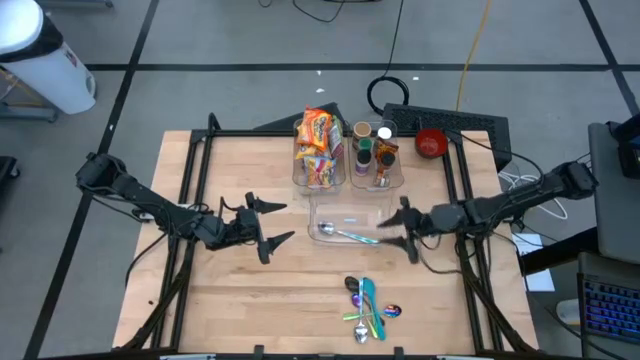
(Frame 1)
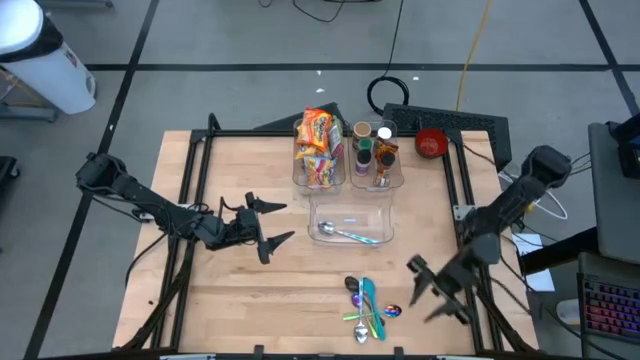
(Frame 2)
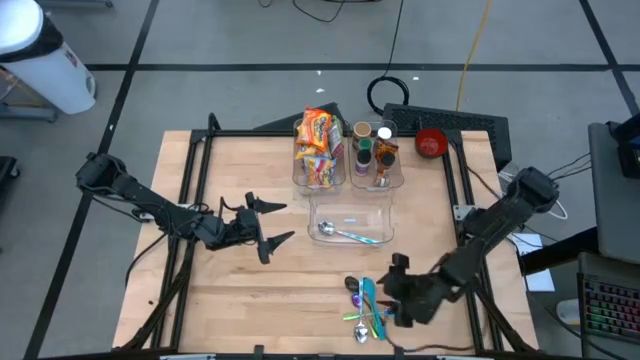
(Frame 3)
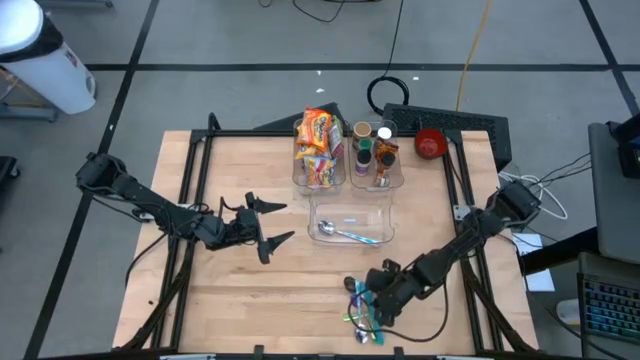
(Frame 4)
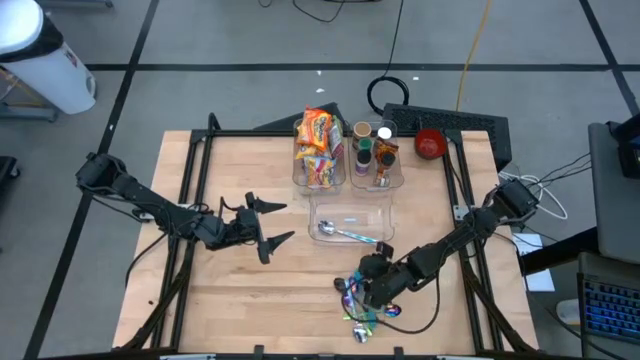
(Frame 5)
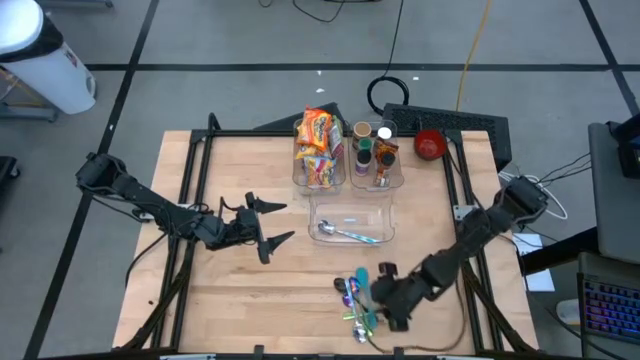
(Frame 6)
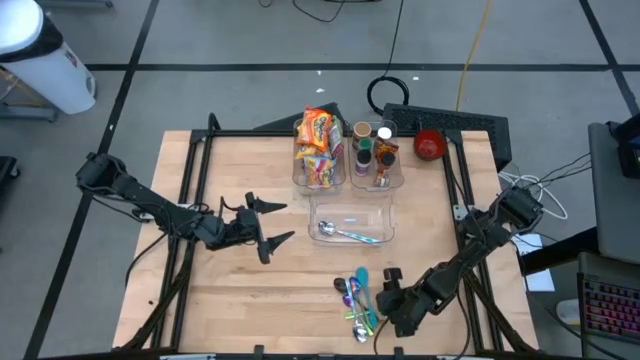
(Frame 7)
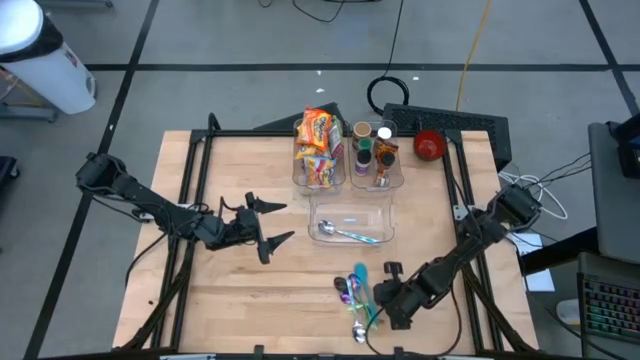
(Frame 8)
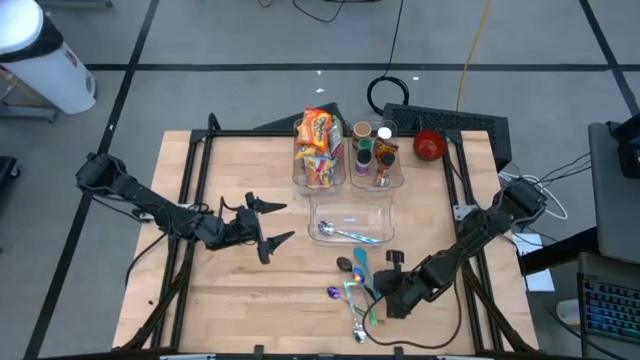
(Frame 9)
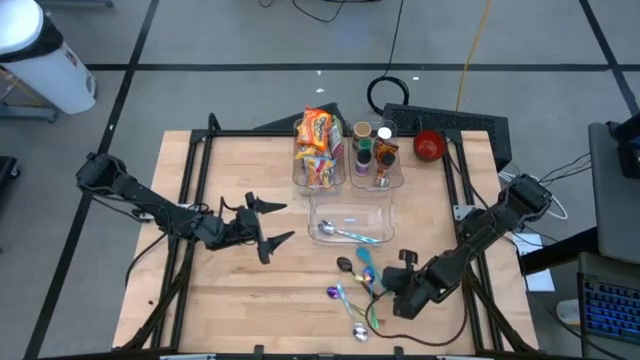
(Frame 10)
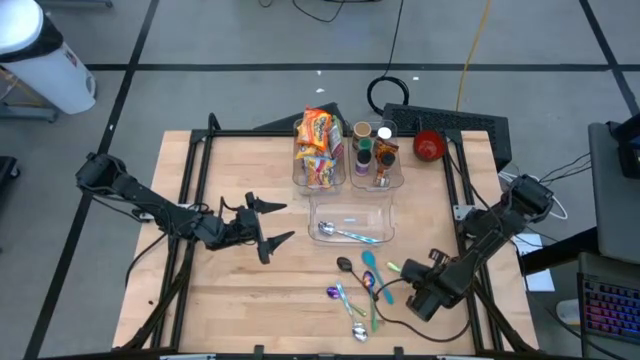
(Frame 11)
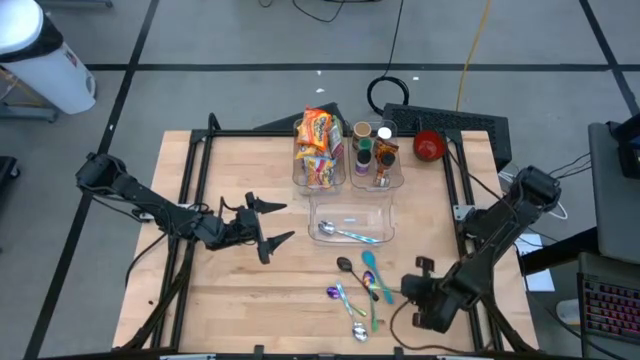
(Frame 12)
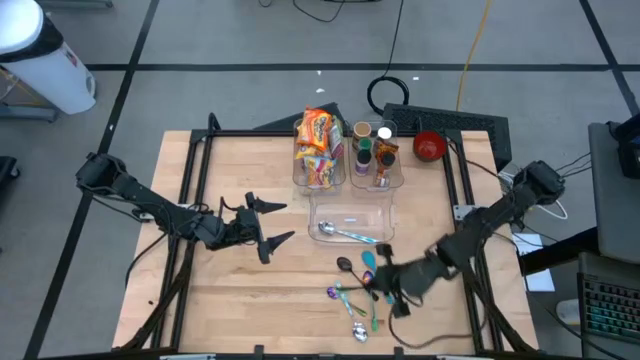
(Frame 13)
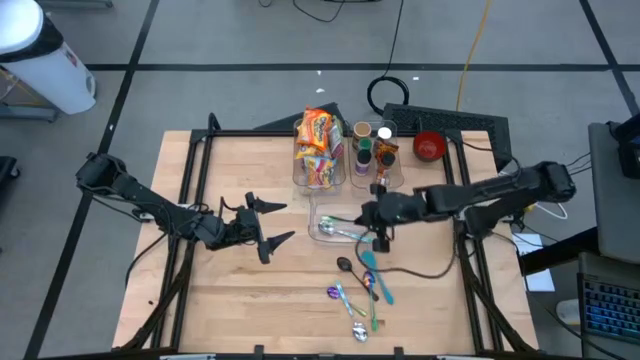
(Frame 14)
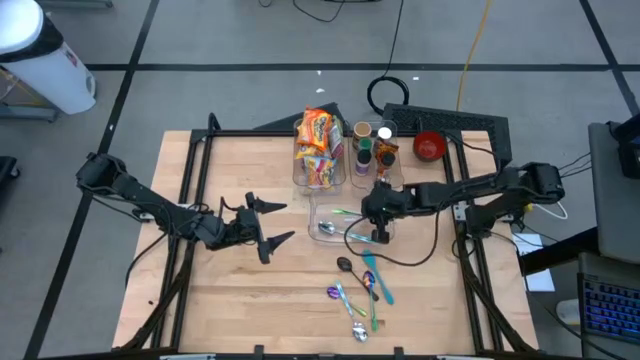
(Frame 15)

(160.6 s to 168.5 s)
Task: Pick & Place Food Item
Put the right blue green spoon into the bottom transparent bin

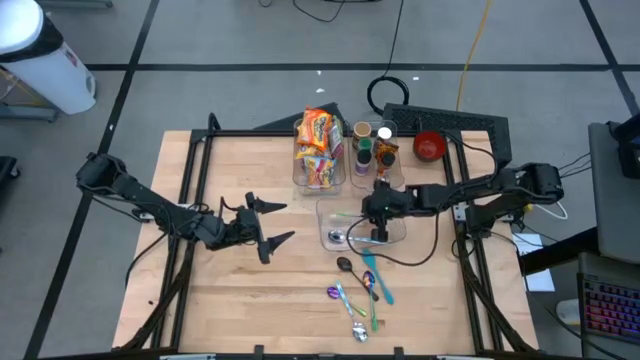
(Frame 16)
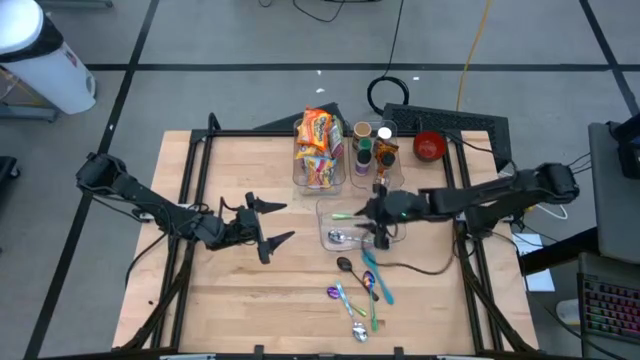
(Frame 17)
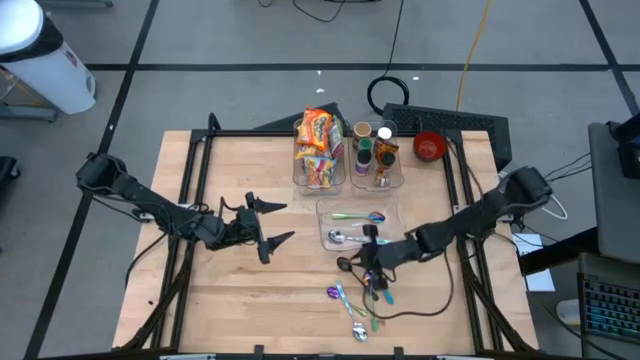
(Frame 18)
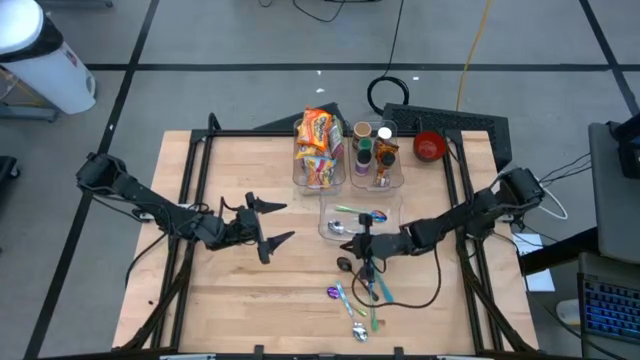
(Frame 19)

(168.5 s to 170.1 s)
Adjust the bottom transparent bin on the table

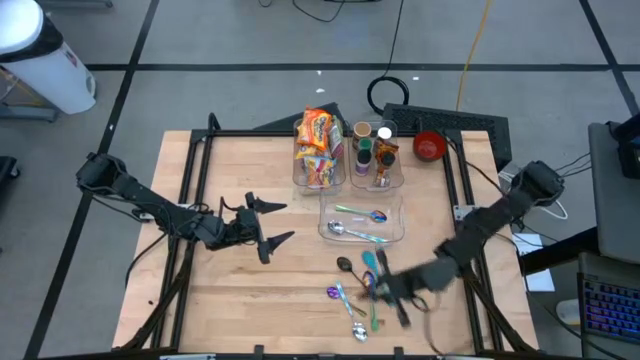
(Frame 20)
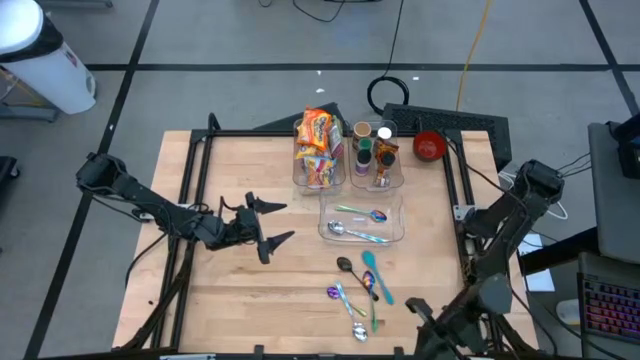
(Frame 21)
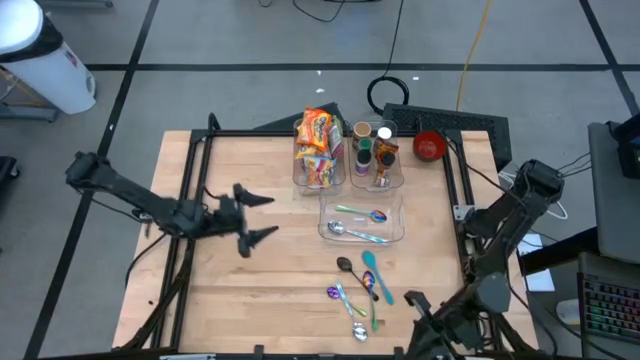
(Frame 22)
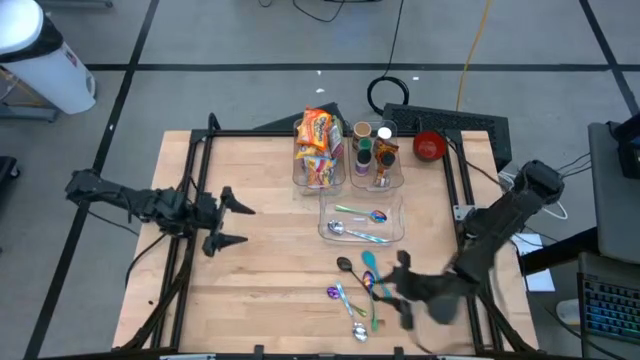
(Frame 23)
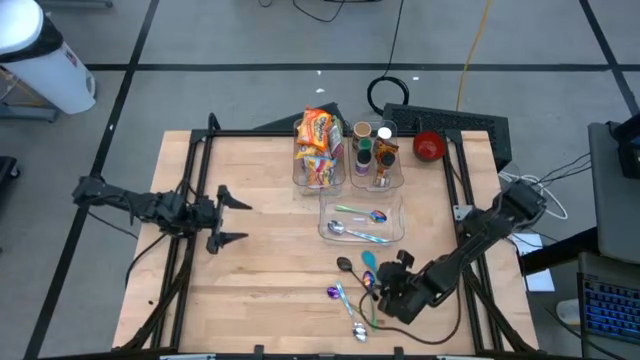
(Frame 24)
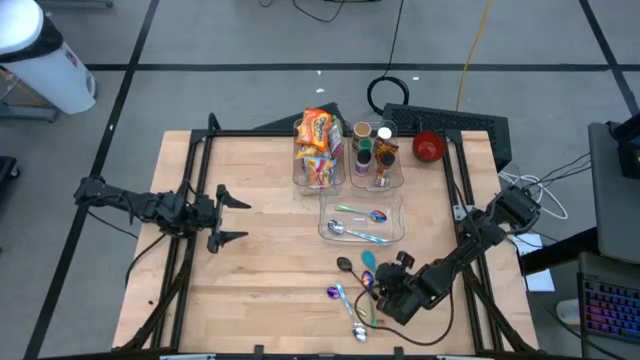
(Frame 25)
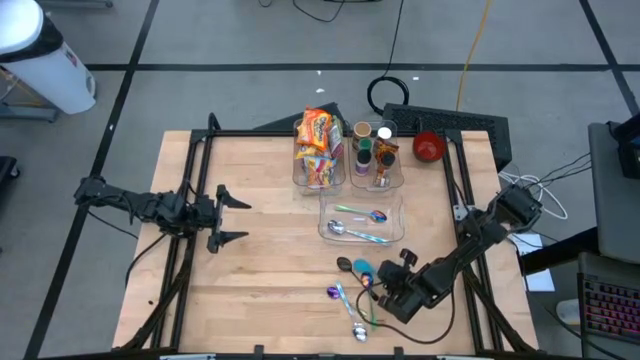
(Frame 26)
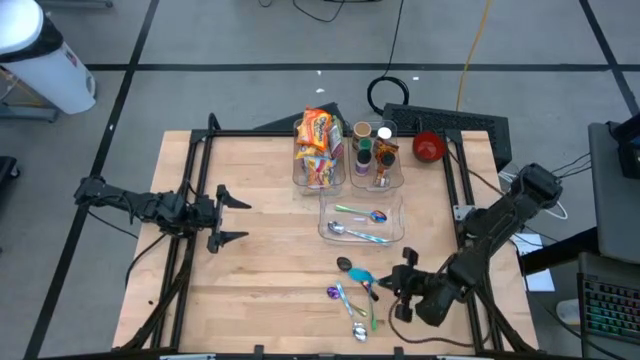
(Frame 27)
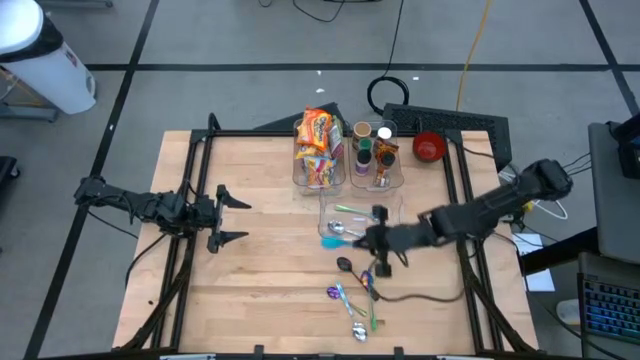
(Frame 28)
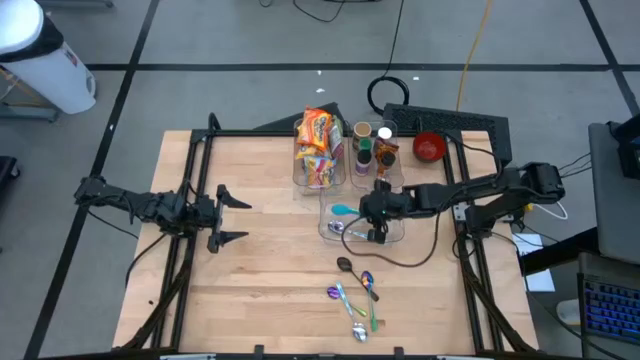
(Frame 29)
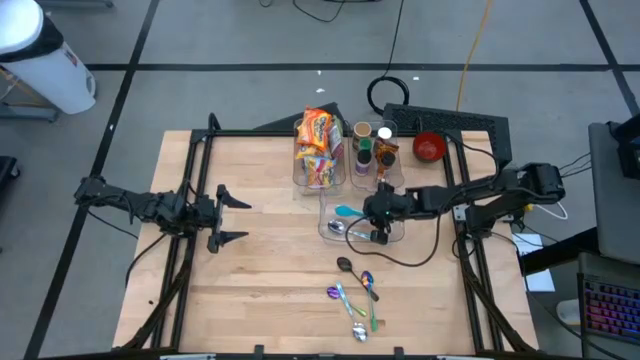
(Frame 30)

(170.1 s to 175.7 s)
Put the blue spoon into the bottom transparent bin

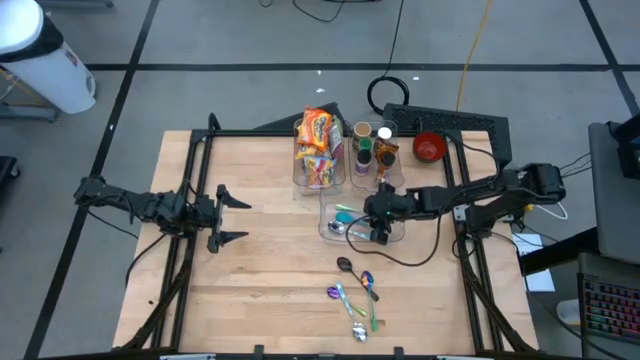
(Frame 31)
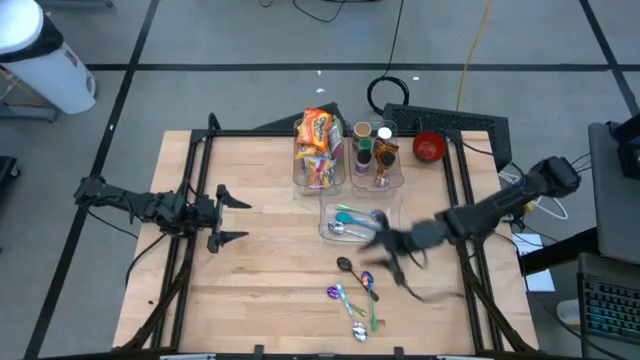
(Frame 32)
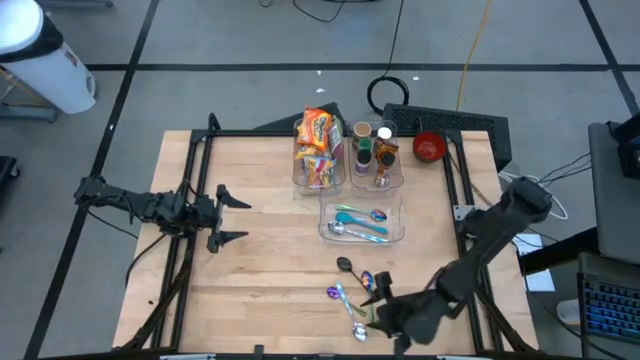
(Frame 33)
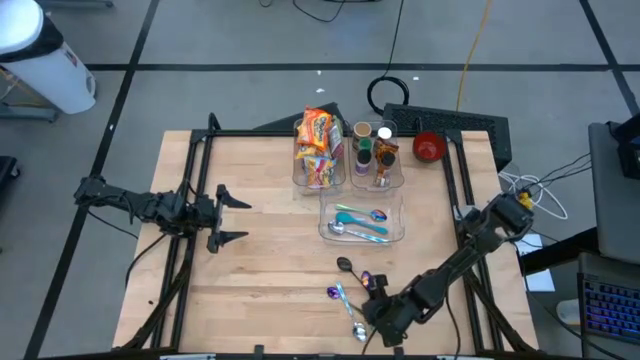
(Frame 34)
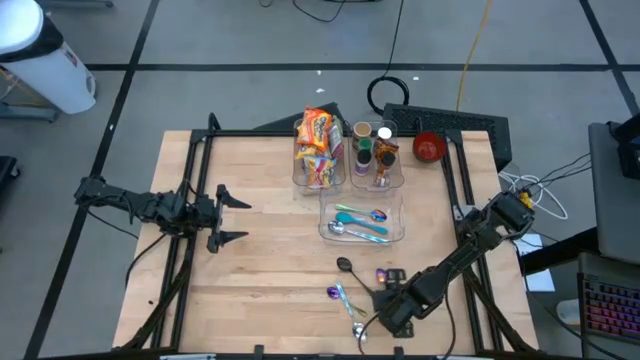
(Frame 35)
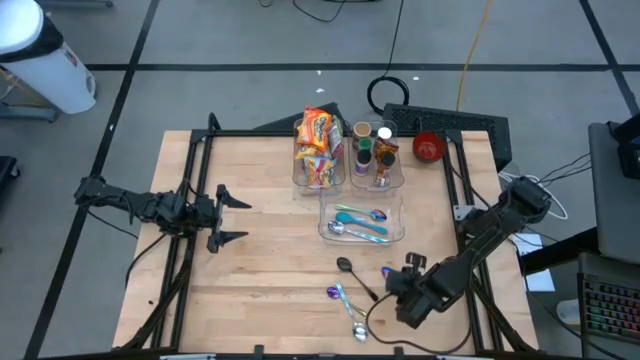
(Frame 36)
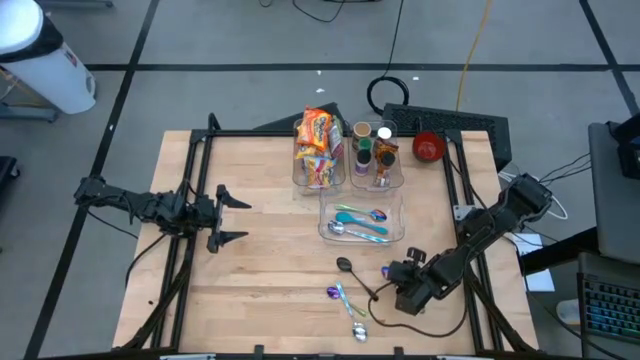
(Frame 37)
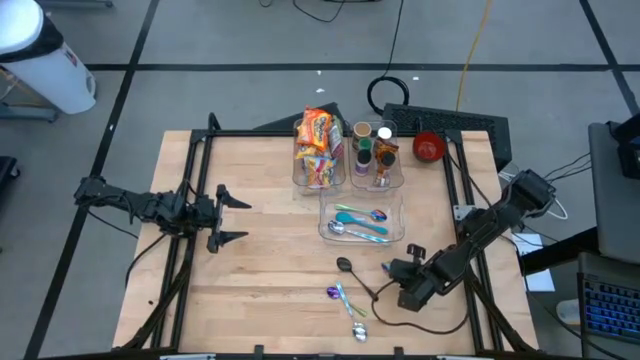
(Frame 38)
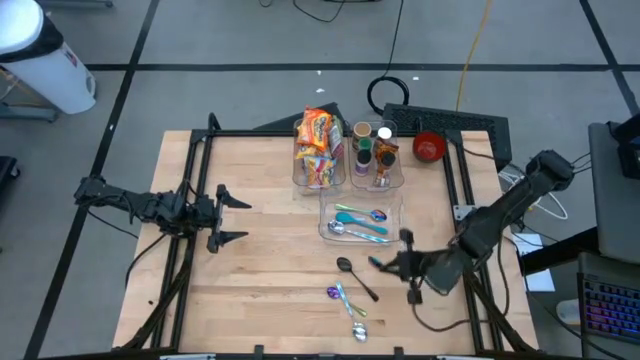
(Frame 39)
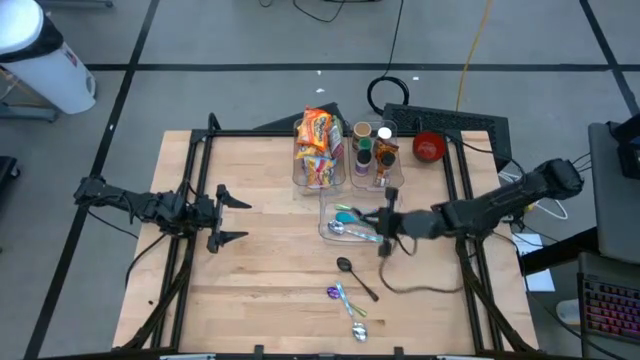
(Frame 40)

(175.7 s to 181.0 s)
Put the right blue green spoon into the bottom transparent bin

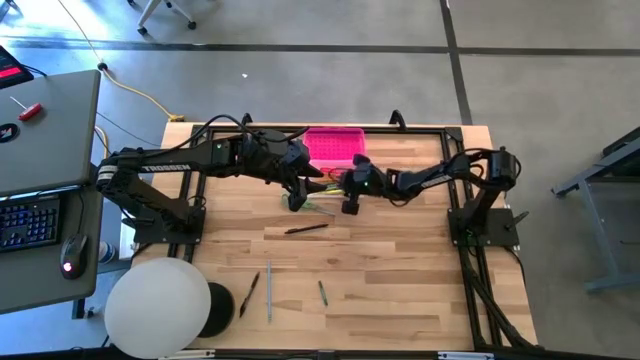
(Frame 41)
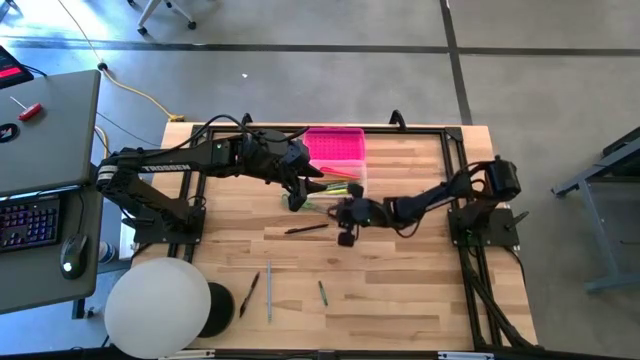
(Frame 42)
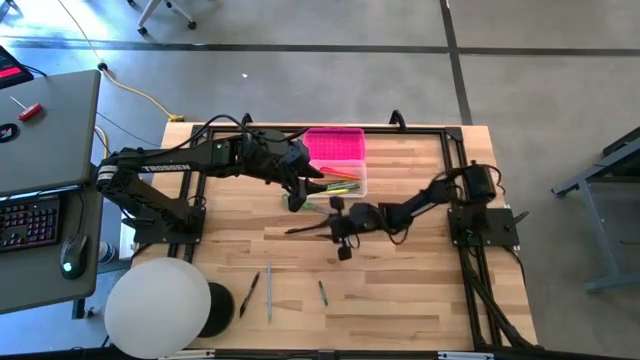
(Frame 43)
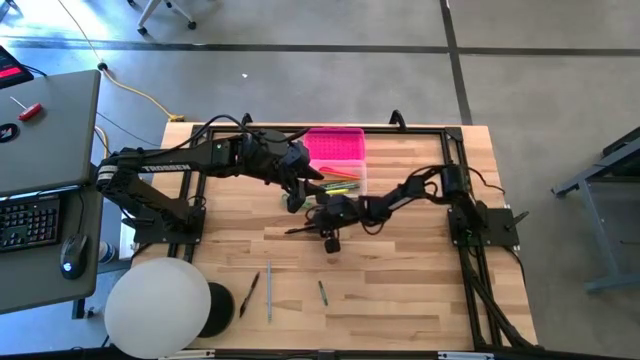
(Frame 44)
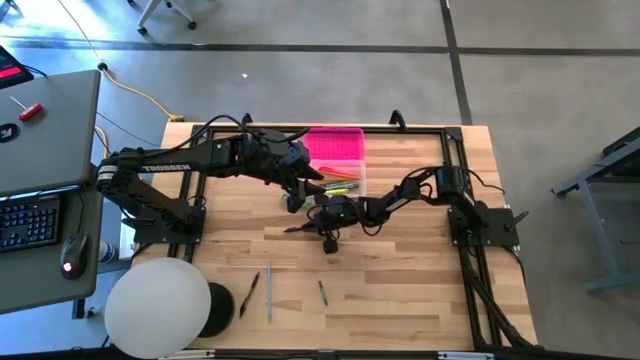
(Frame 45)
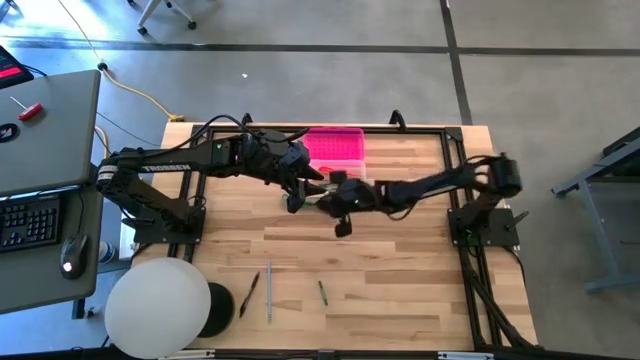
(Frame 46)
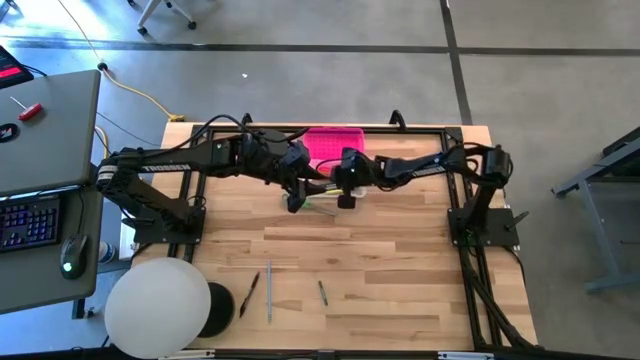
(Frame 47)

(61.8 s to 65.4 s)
Task: Pick & place school supplies into a supply box
Put the top black pen into the supply box
